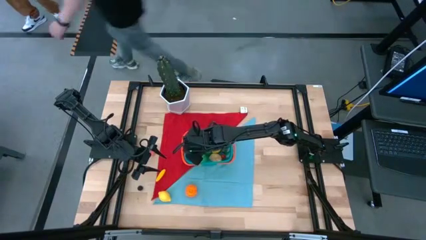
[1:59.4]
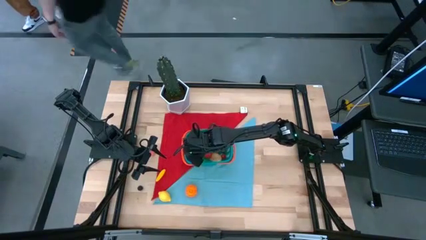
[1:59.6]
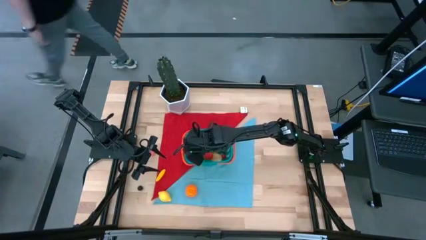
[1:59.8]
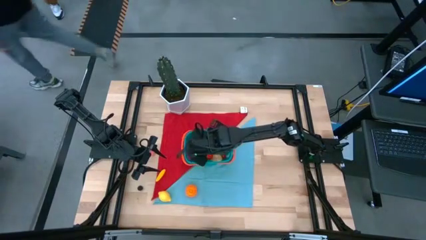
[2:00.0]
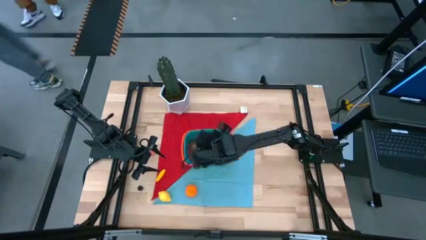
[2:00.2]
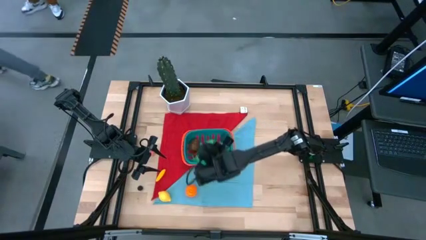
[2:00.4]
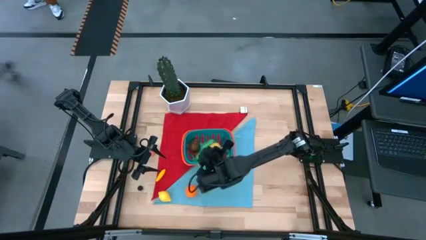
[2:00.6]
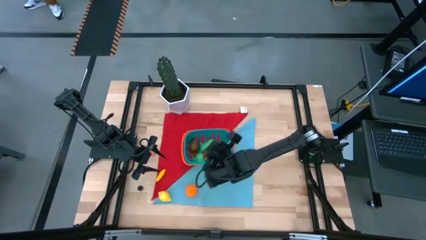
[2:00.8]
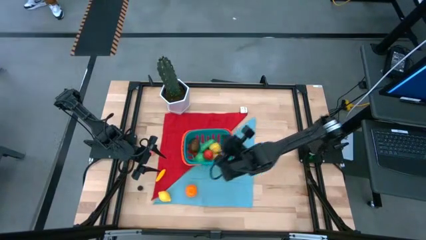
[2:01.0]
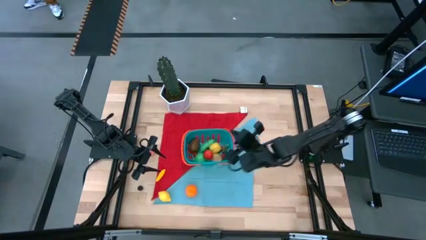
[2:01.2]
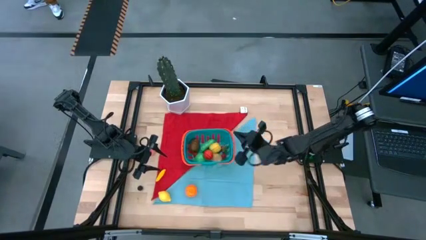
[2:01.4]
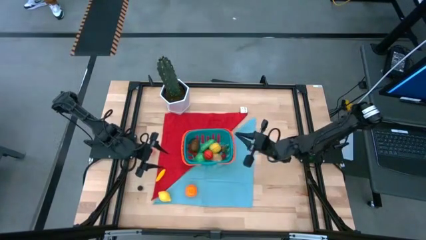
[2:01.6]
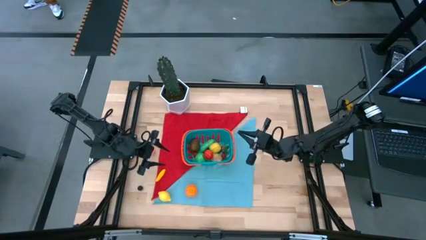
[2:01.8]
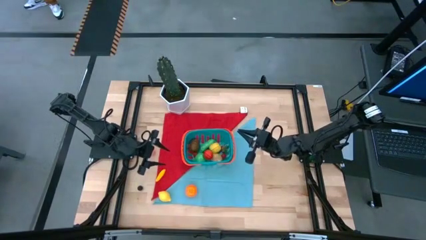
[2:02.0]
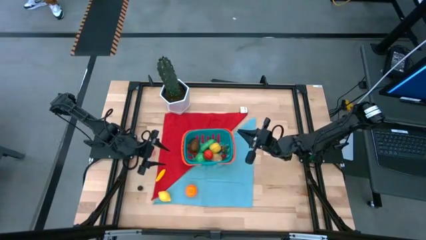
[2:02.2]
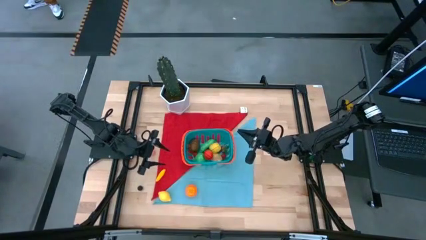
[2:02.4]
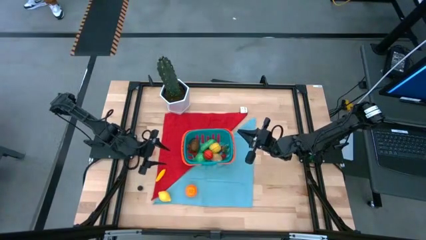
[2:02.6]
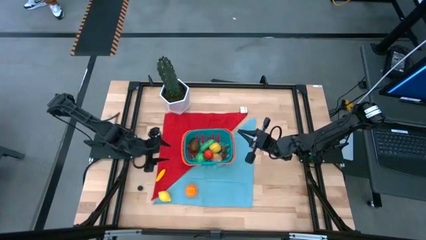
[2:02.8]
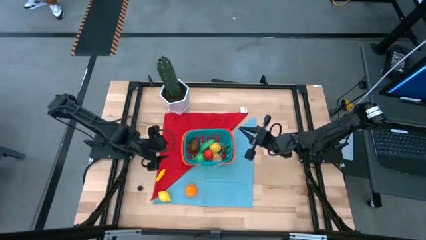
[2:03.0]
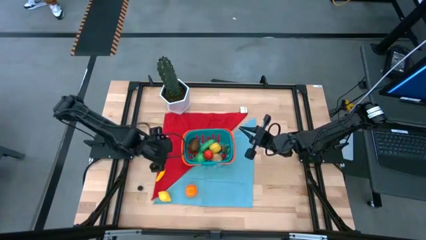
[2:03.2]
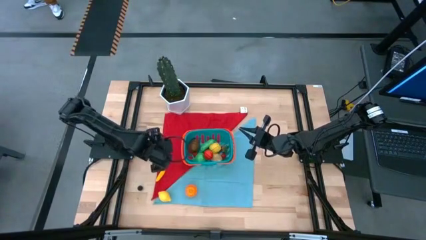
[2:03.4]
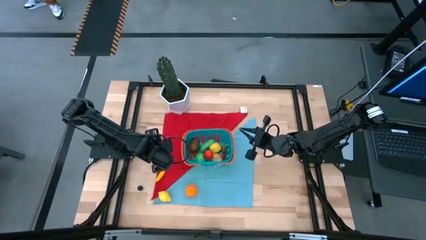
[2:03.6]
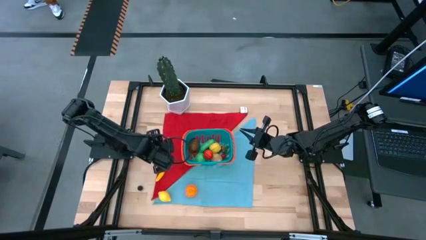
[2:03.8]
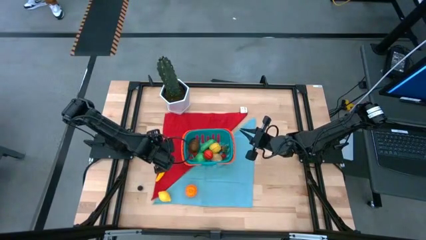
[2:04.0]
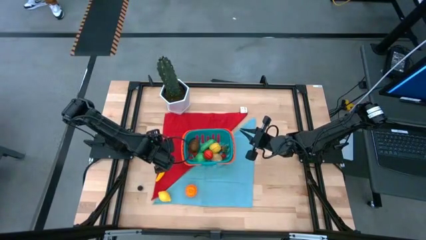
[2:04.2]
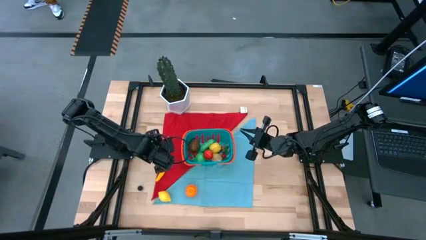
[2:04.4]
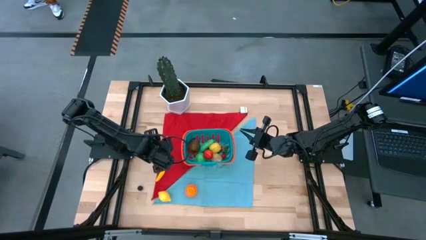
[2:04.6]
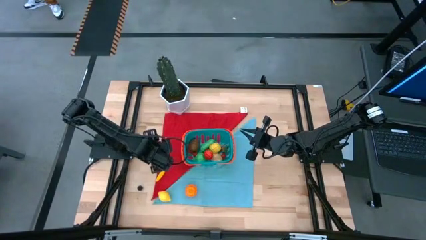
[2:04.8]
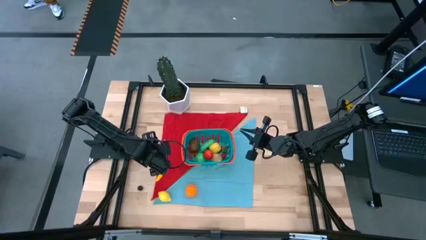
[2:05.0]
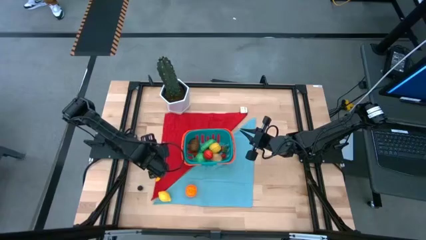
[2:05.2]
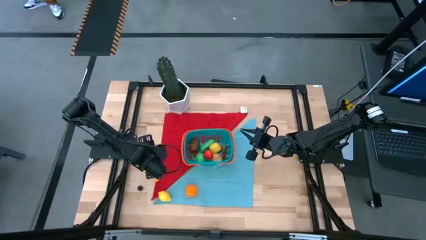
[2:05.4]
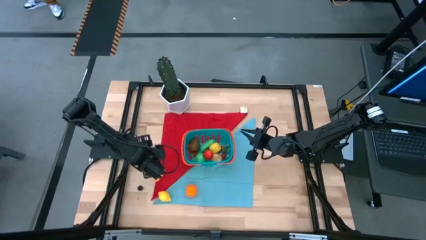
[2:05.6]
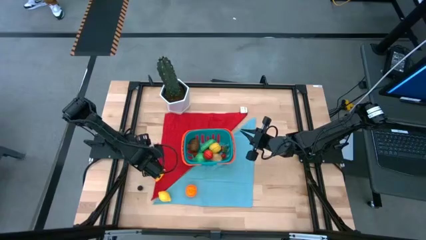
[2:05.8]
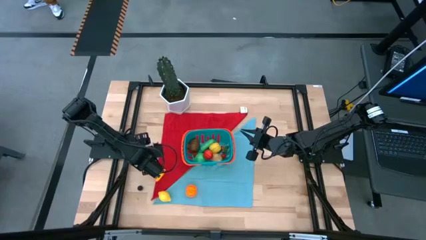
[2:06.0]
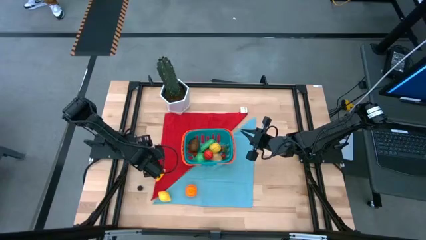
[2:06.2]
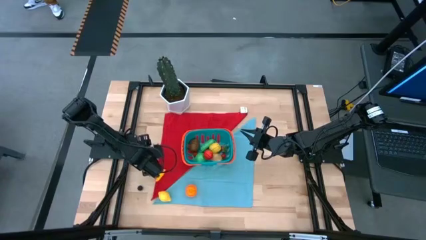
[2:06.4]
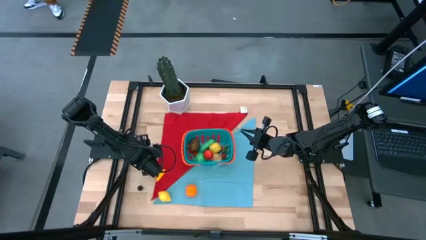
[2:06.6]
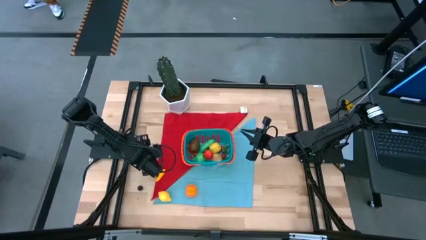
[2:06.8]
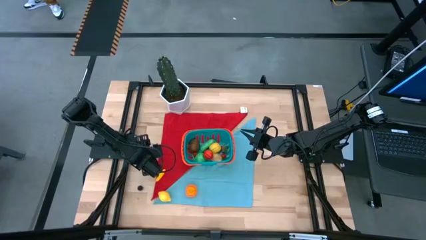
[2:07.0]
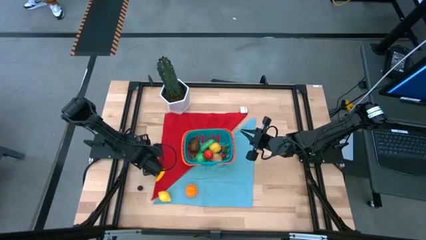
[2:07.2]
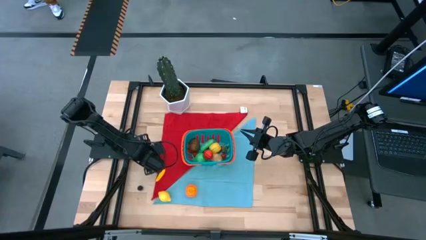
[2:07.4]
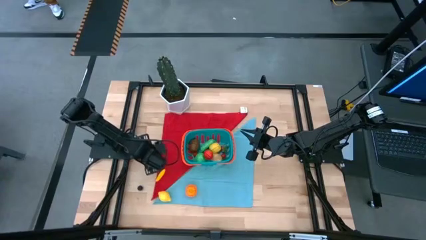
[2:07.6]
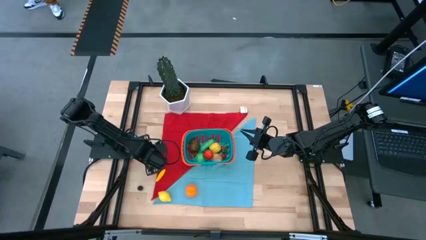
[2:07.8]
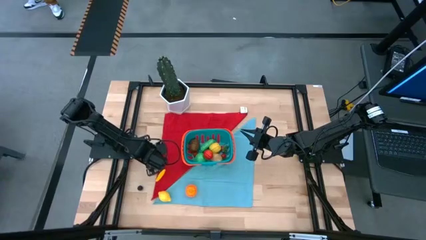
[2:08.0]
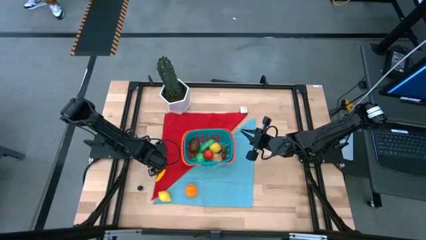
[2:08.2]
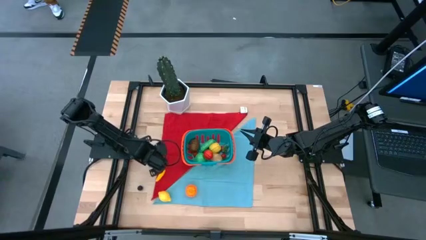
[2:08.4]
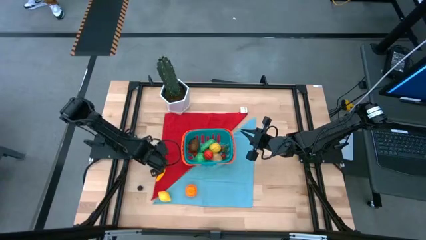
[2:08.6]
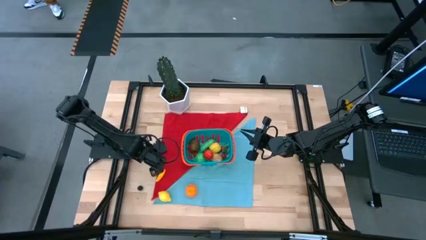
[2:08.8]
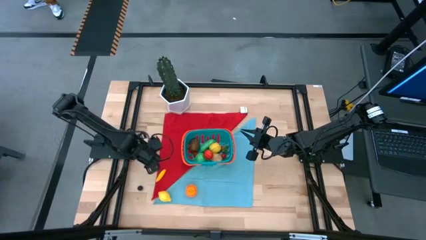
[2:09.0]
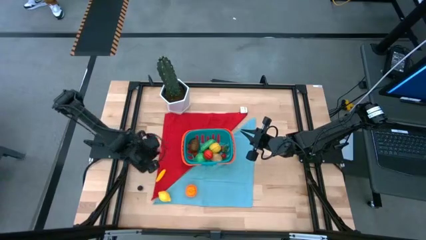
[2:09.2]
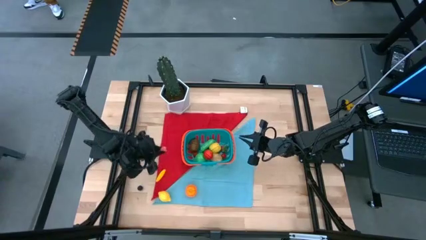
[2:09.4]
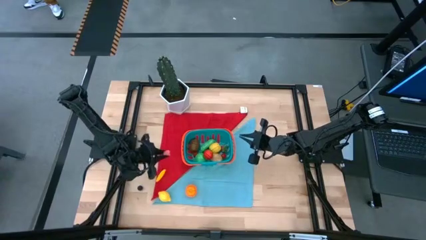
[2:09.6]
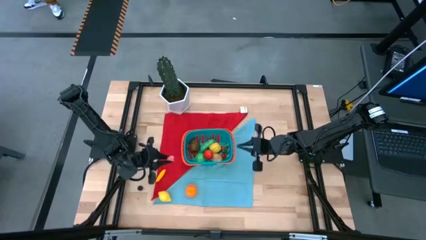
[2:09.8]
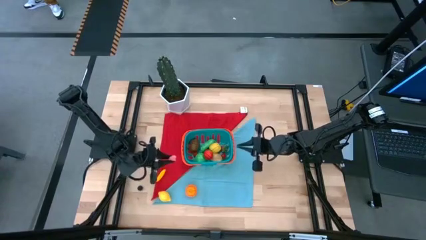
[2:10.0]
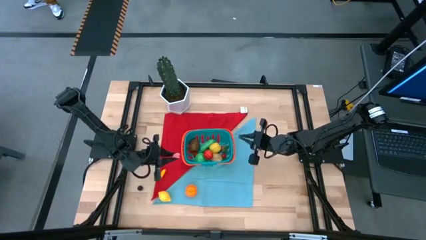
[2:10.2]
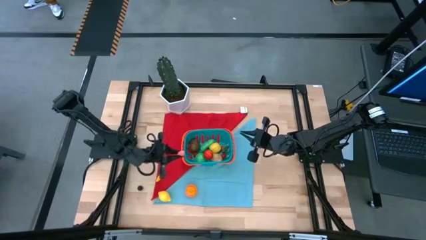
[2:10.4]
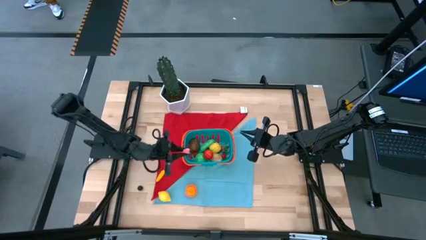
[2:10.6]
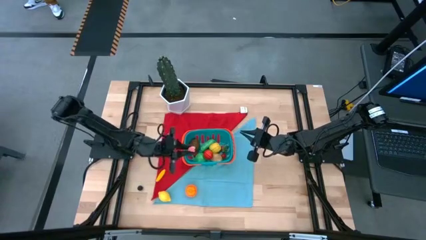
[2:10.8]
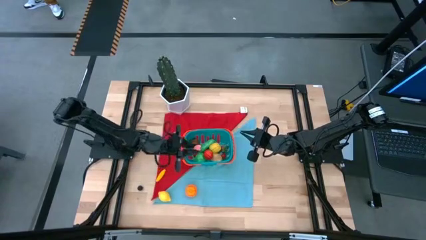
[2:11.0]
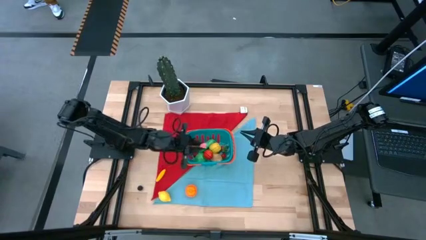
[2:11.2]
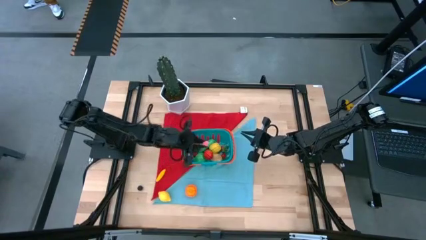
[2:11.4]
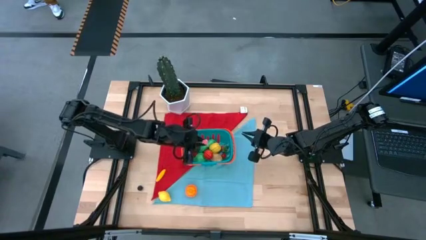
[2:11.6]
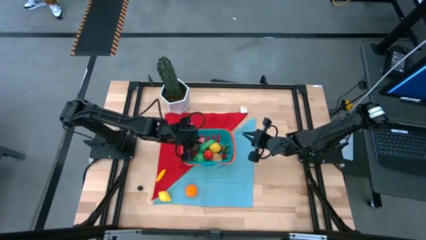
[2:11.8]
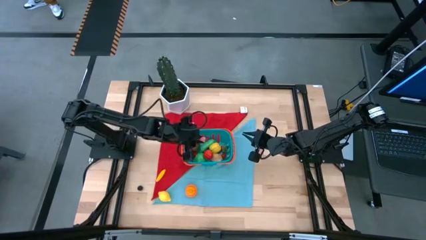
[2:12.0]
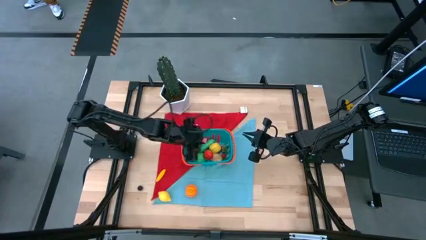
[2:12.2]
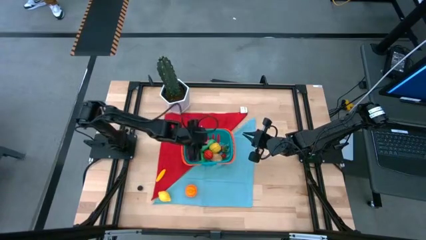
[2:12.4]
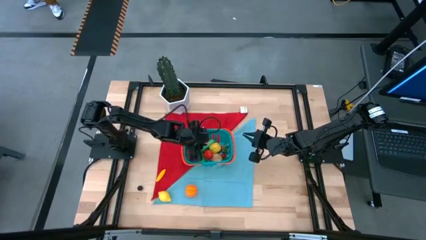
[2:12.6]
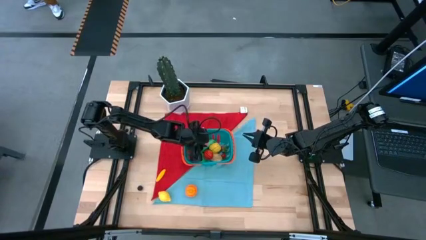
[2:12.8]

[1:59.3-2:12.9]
Task: Build produce basket
Put the pink peach into the blue basket

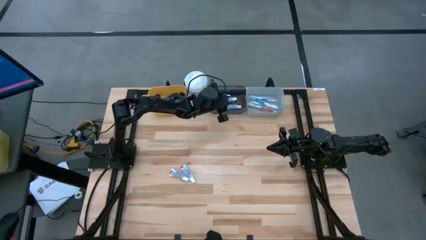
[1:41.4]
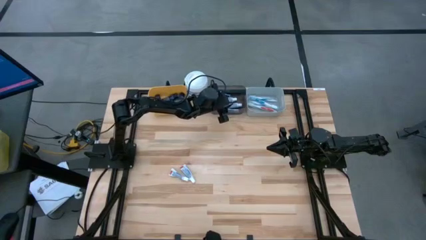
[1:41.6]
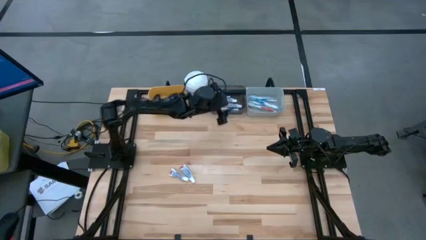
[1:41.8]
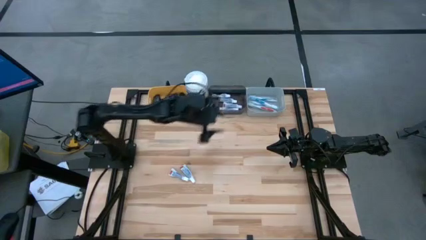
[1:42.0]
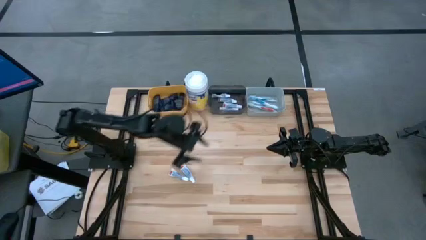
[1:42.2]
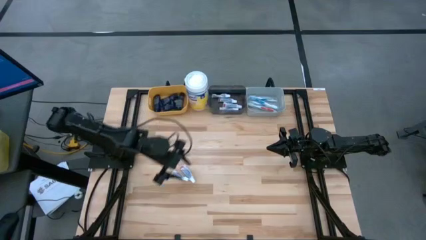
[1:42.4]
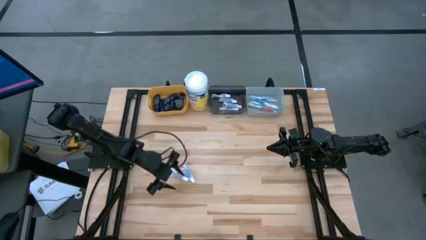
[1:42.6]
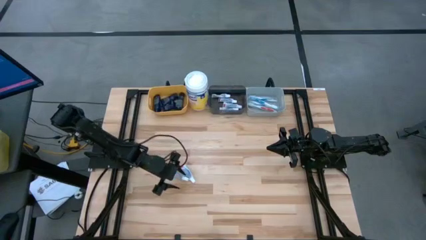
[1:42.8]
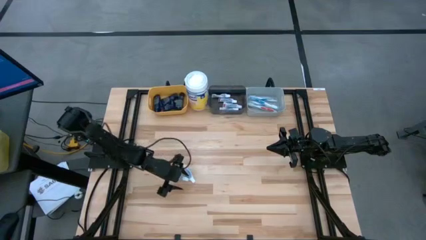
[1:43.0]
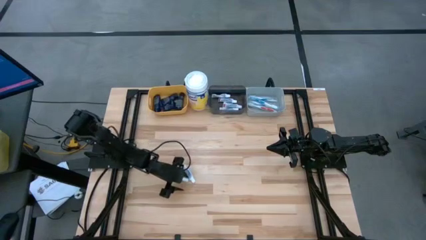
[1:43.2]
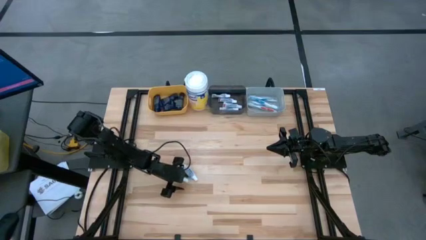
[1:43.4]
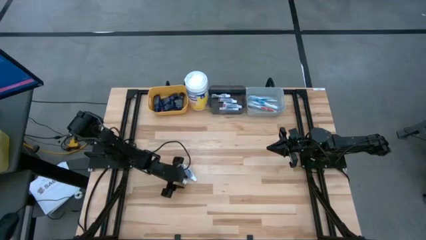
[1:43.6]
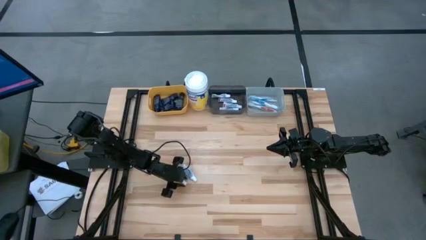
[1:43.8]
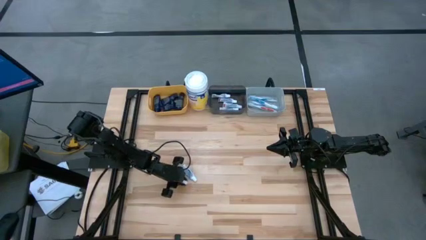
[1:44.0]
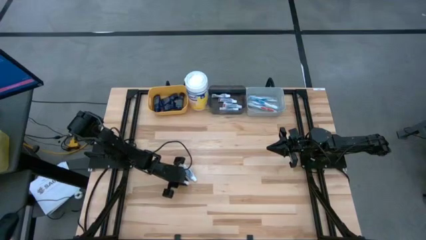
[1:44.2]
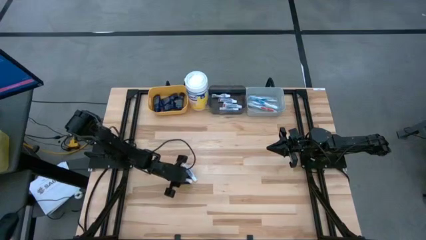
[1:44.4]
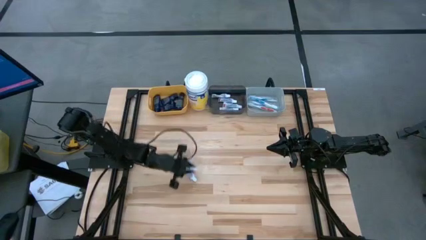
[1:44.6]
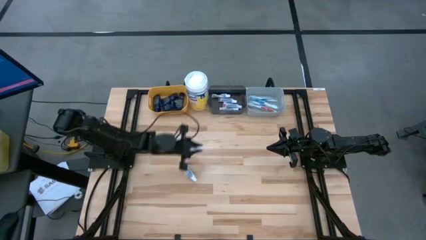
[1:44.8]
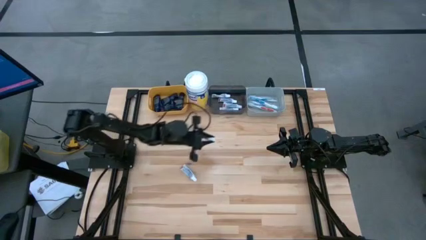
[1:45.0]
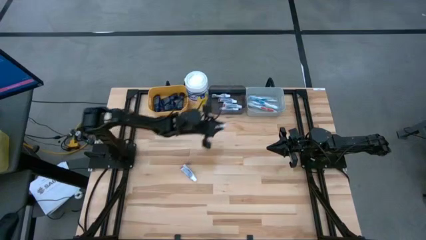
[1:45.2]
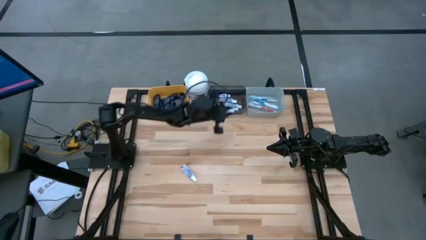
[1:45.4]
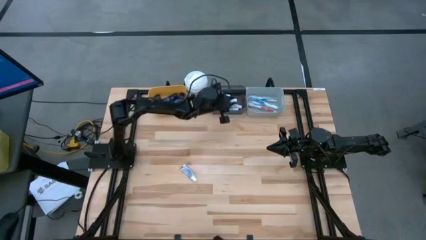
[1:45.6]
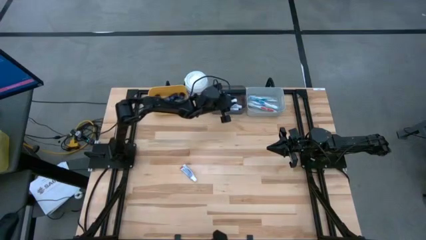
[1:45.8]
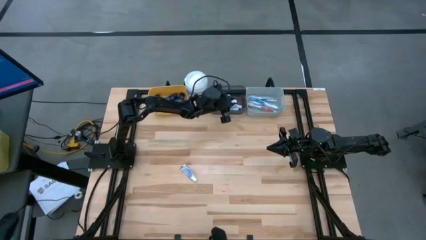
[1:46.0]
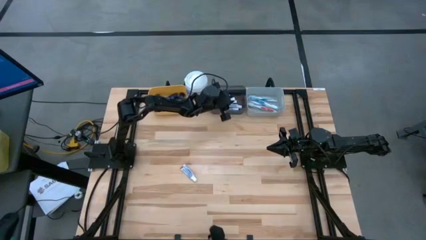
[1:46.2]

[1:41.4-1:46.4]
Task: Pick & Place Travel size toiletries
Put the white toothpaste into the black bin
